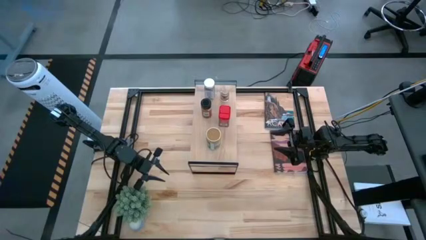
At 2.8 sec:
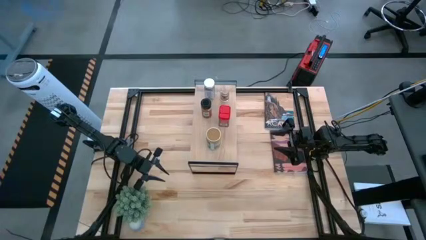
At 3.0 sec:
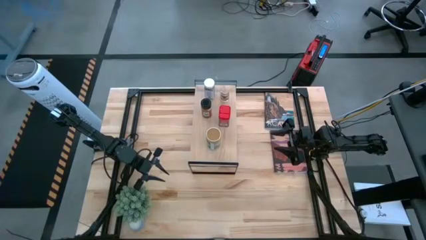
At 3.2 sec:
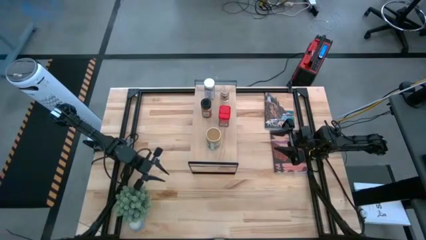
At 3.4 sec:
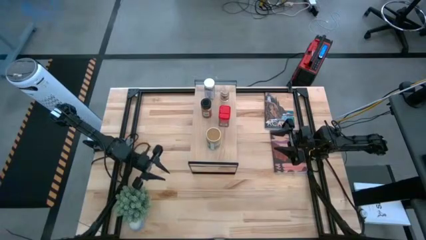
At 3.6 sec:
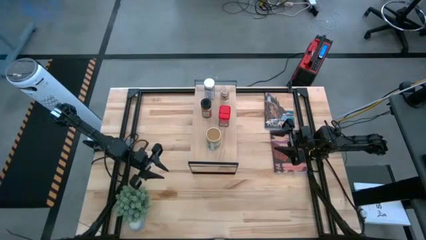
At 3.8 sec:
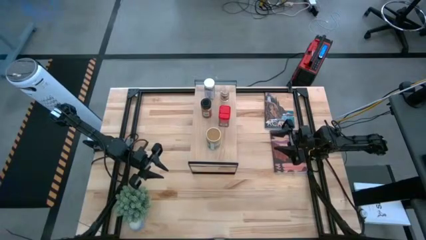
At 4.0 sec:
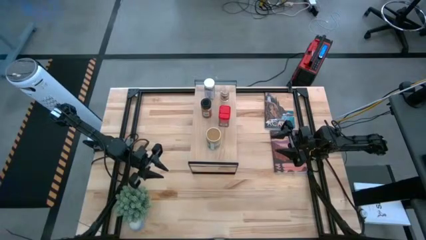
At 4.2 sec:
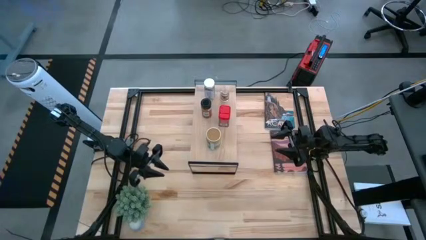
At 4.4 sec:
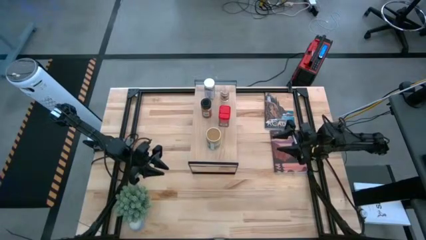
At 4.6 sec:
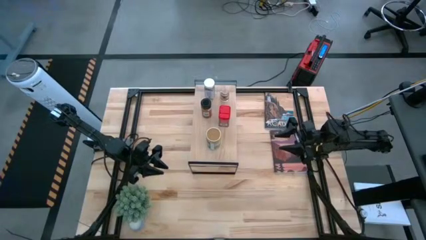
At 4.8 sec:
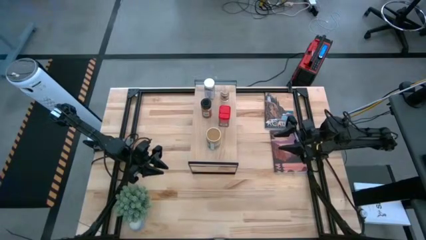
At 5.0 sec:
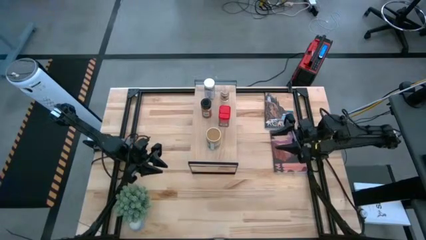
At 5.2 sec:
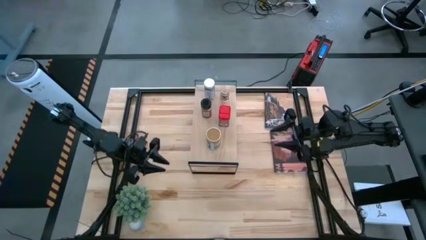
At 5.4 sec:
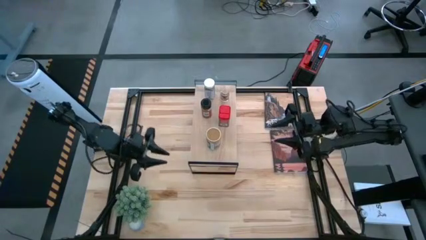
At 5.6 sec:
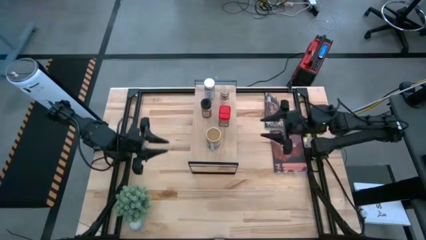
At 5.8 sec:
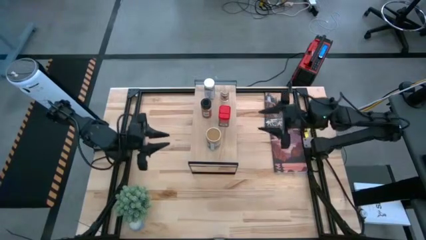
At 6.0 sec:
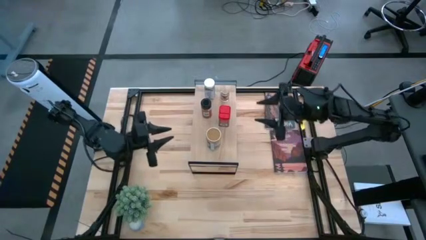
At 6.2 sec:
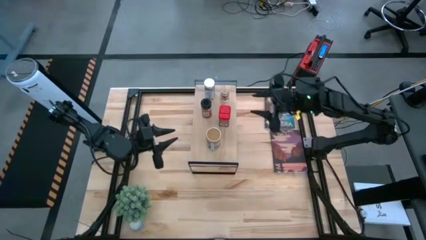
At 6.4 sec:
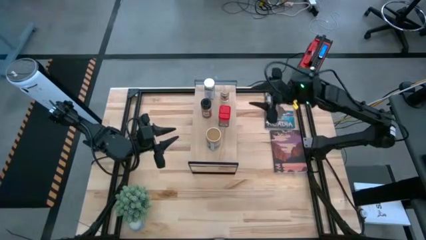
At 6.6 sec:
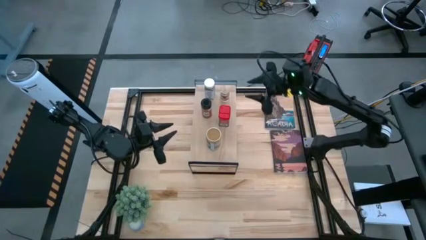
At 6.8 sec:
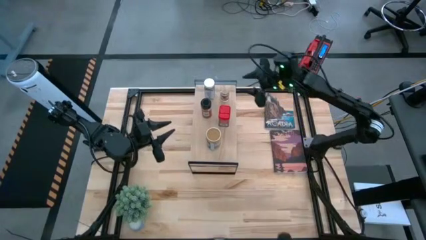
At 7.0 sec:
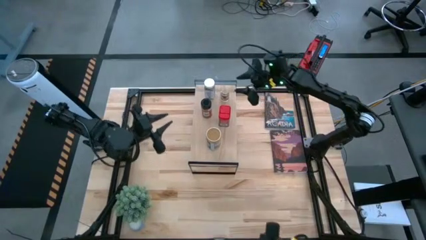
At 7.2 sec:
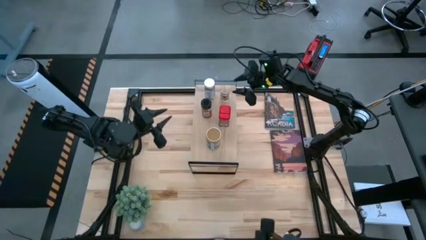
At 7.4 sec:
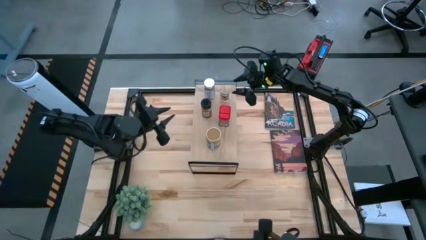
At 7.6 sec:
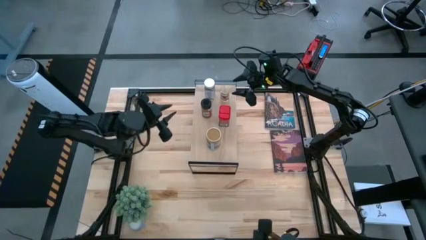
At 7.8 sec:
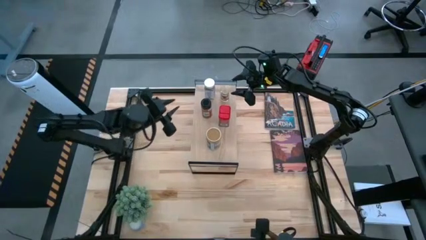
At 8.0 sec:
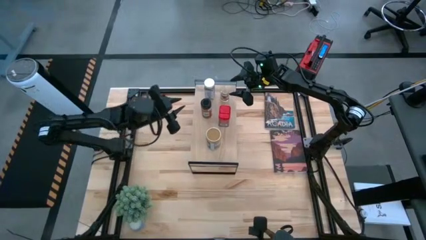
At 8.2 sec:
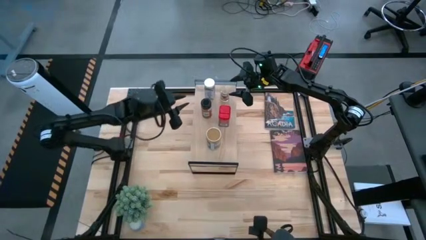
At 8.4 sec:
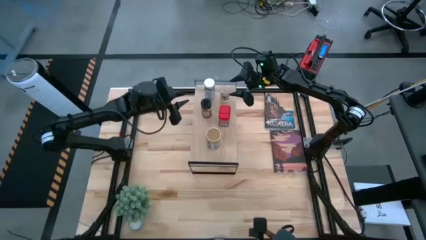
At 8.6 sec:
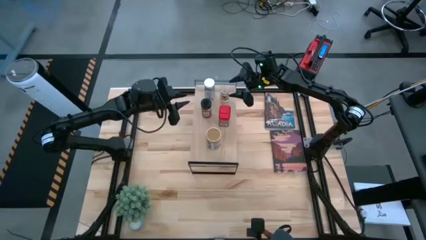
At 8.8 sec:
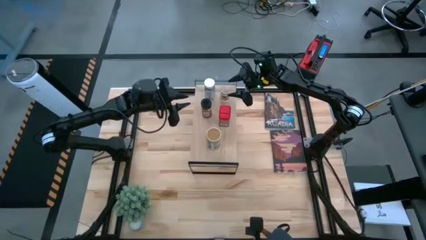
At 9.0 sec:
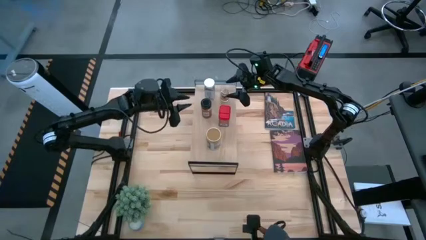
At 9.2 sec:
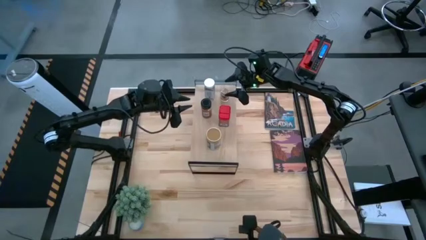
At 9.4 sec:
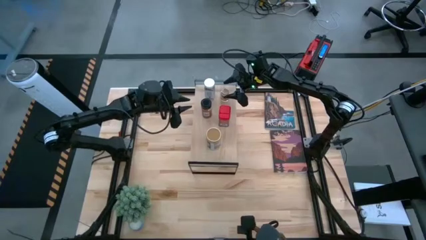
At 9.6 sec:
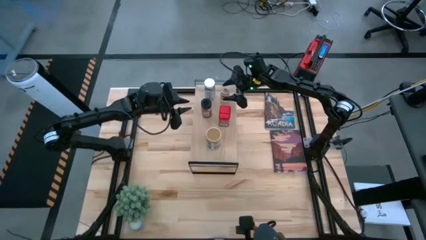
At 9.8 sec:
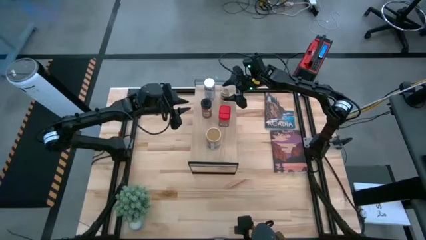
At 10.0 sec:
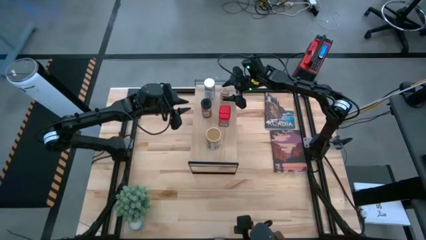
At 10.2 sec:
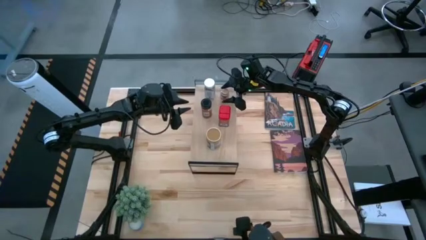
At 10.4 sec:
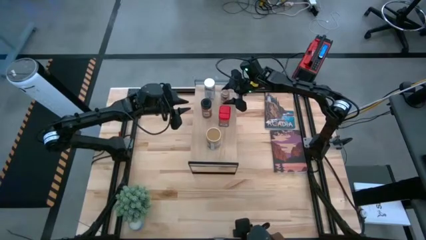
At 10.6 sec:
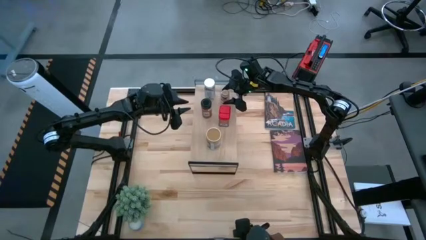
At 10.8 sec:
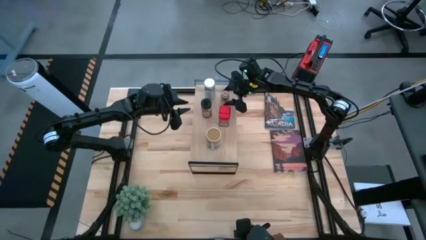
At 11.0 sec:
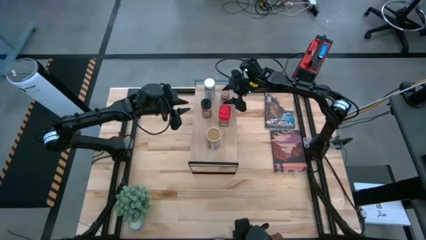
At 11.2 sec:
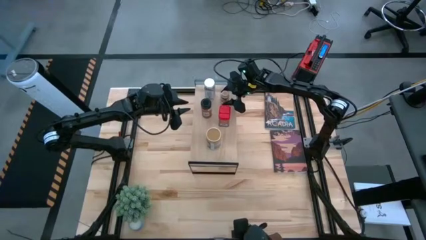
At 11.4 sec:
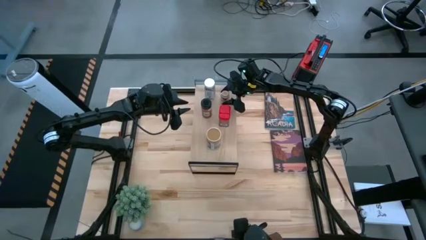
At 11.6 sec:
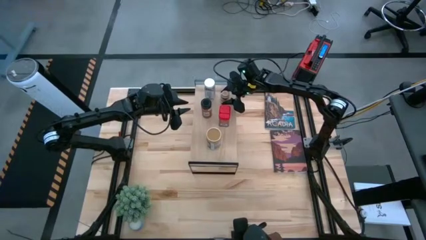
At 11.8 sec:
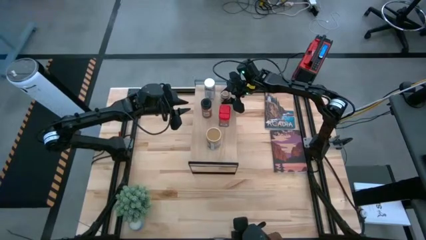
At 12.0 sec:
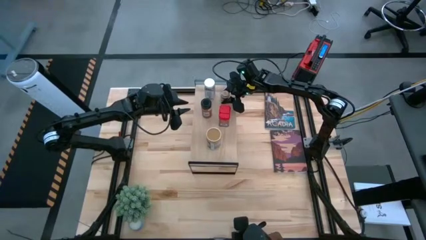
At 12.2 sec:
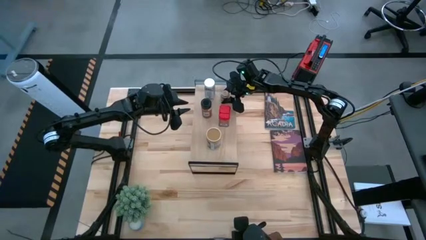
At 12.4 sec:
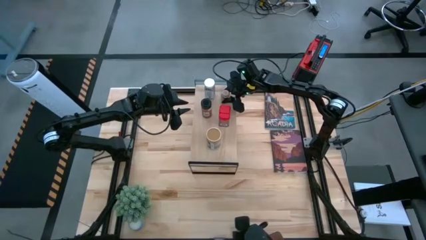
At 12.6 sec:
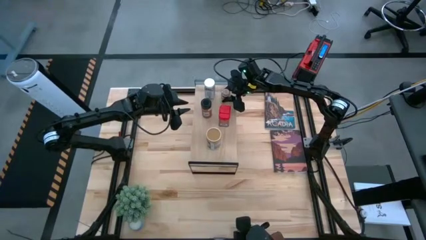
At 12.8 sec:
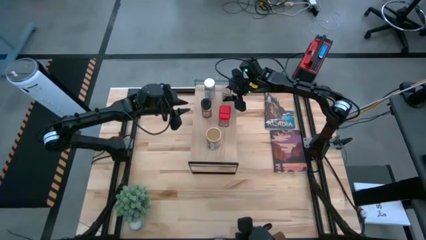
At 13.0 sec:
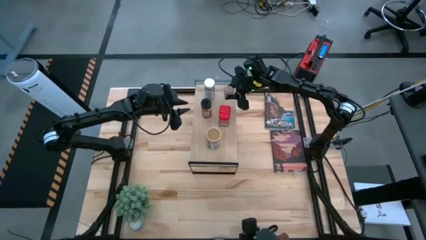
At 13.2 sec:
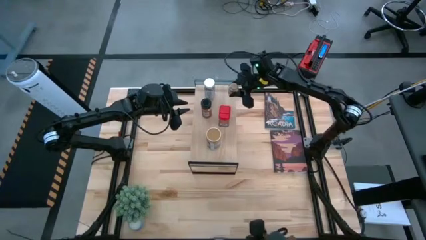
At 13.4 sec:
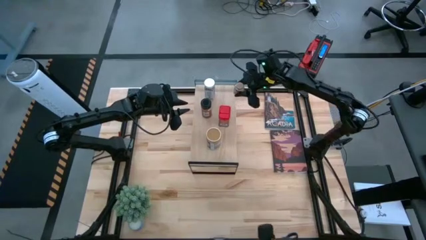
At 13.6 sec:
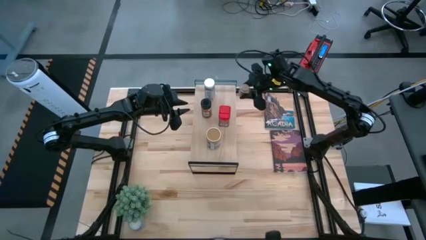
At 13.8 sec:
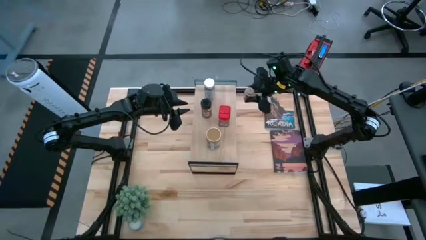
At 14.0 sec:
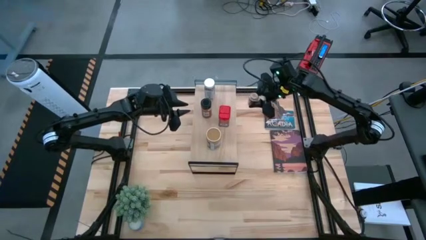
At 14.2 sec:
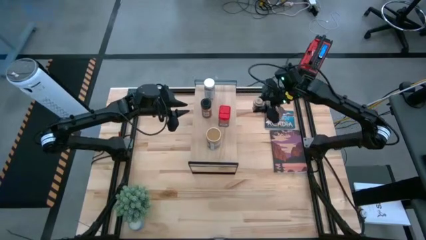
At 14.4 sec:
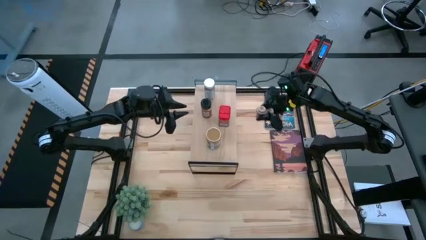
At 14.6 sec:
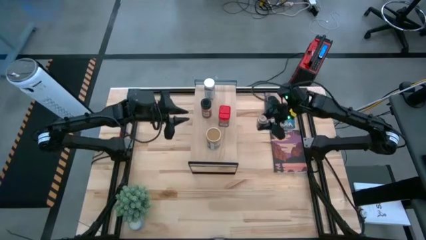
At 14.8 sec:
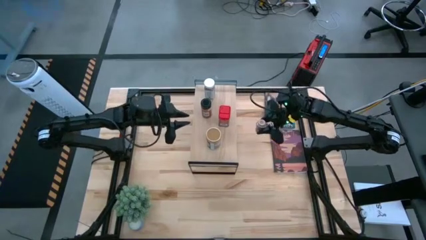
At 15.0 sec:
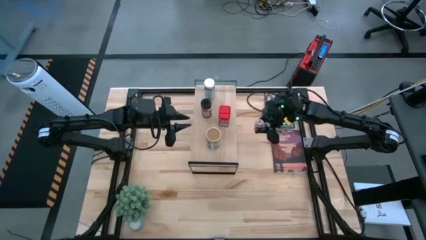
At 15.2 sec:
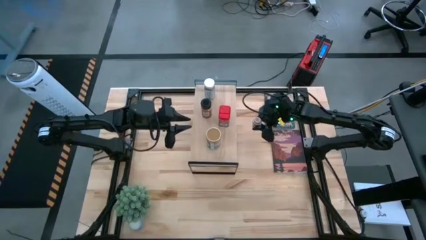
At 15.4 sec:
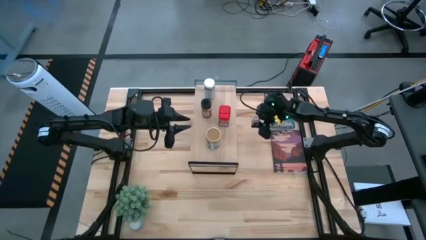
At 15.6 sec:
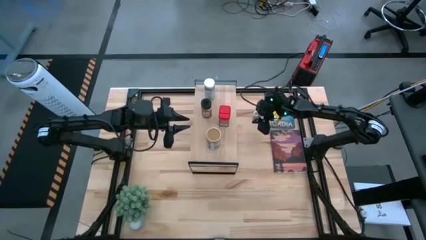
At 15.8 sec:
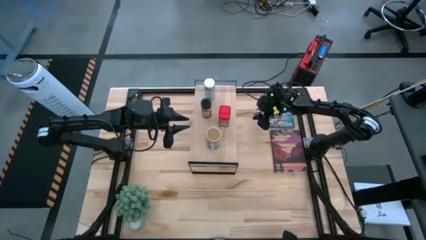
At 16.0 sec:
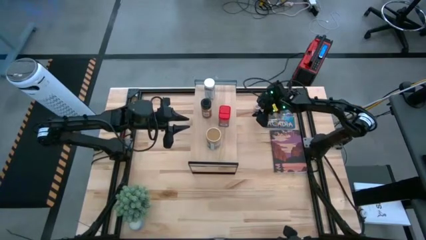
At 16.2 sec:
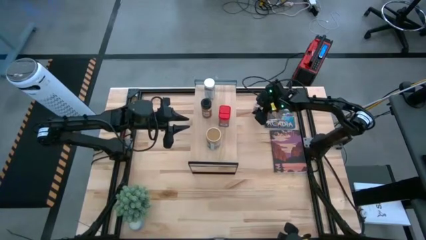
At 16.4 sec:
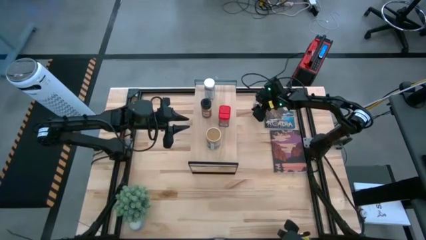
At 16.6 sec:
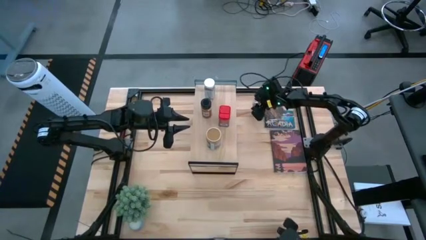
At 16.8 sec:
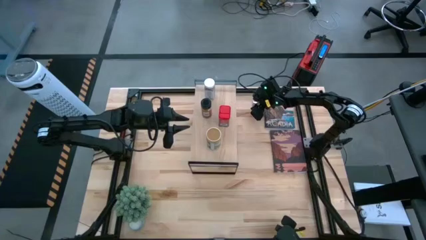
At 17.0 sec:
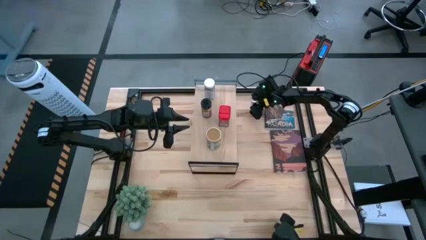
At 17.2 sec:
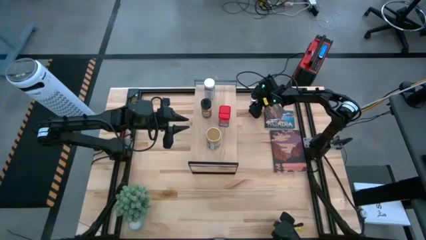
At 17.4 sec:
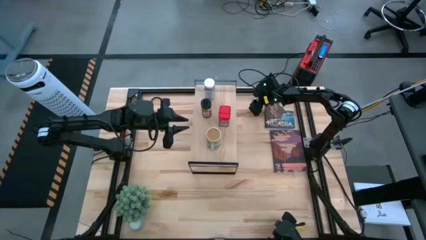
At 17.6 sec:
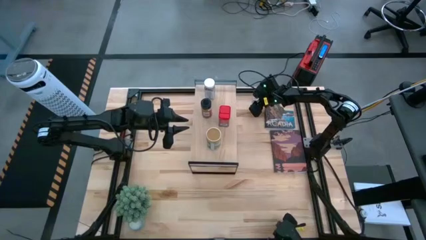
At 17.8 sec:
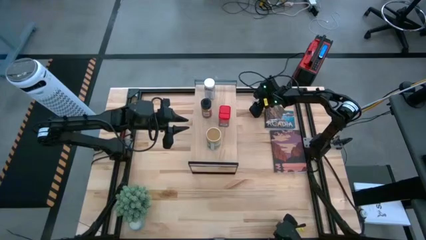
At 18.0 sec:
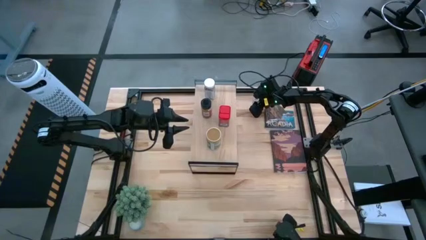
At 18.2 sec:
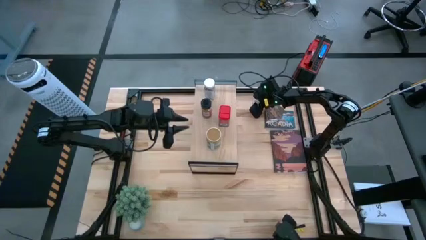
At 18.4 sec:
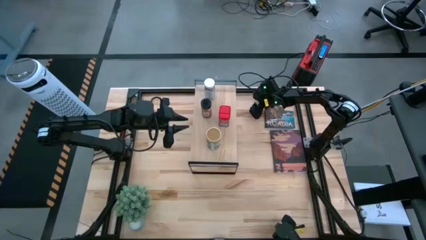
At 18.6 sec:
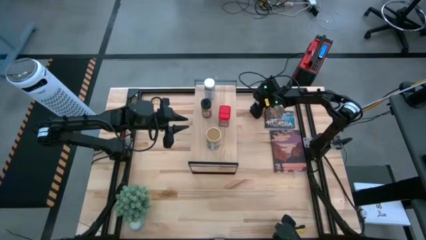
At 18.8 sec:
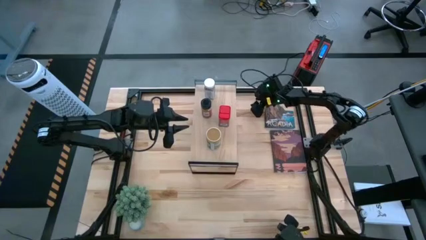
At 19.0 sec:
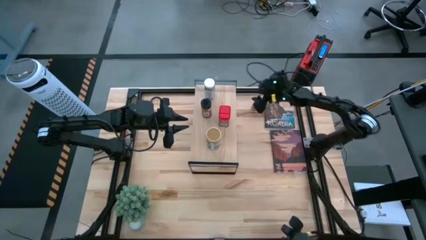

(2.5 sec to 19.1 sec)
Task: Shelf spices
Remove the transparent seasoning bottle from the shelf
